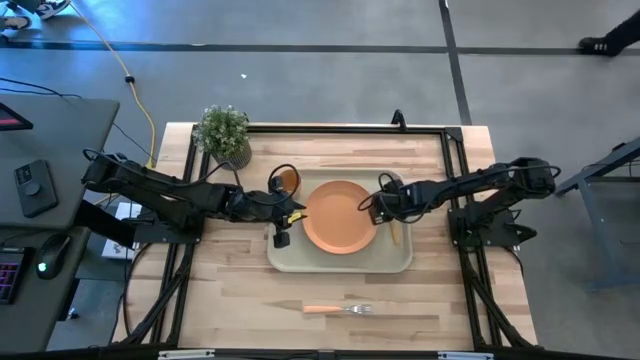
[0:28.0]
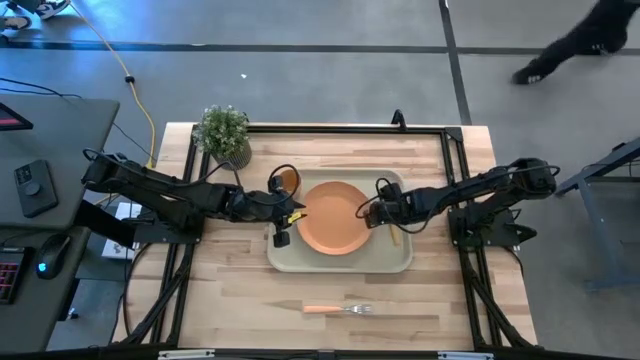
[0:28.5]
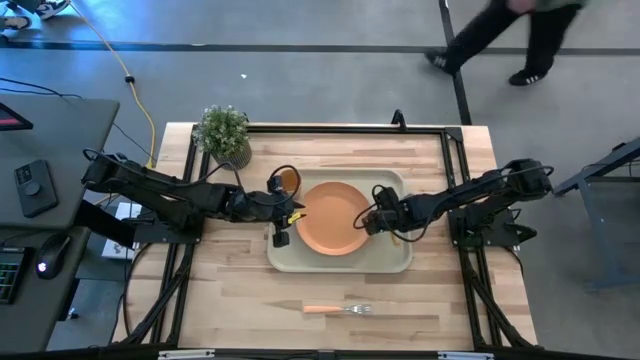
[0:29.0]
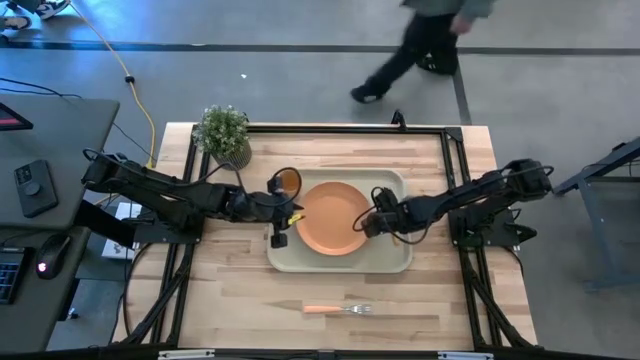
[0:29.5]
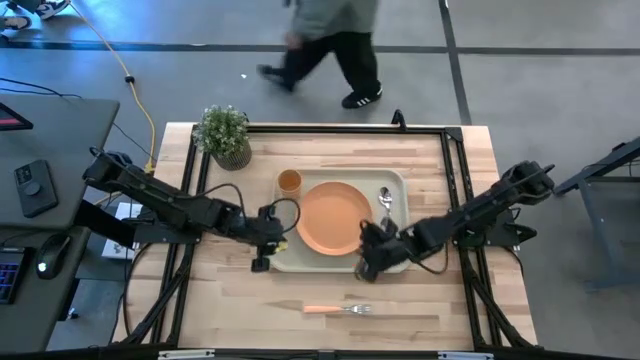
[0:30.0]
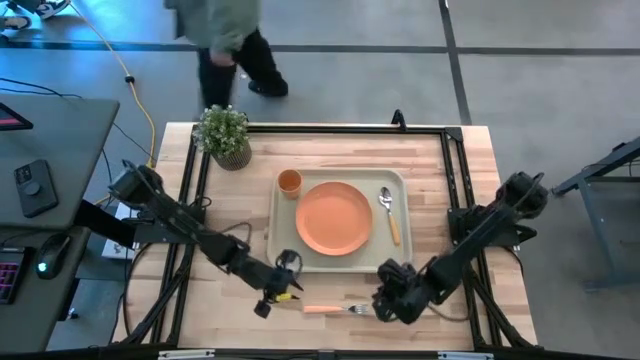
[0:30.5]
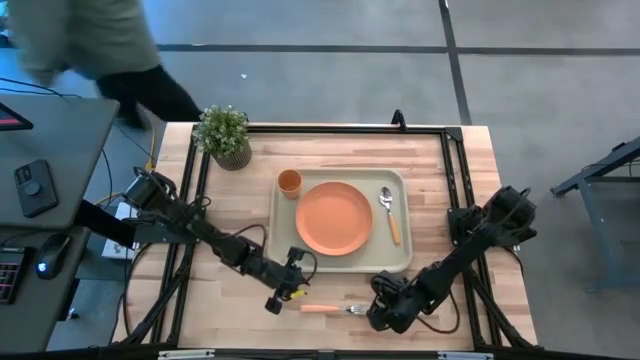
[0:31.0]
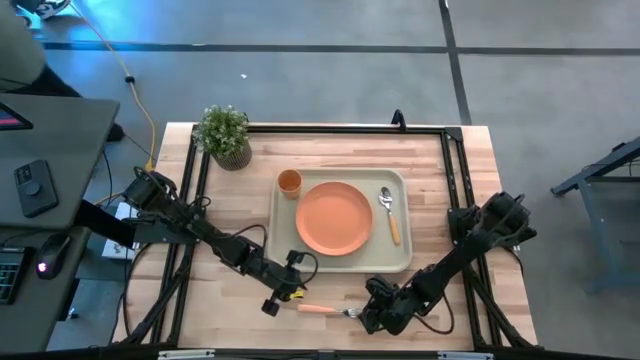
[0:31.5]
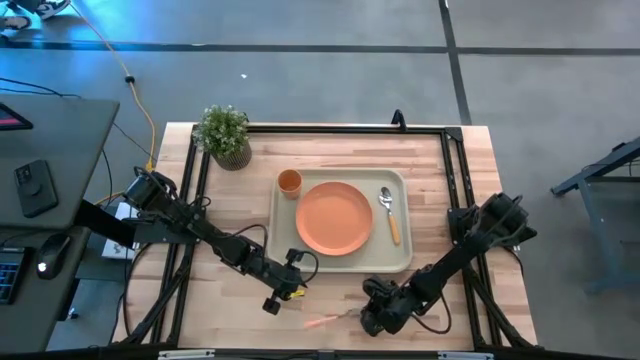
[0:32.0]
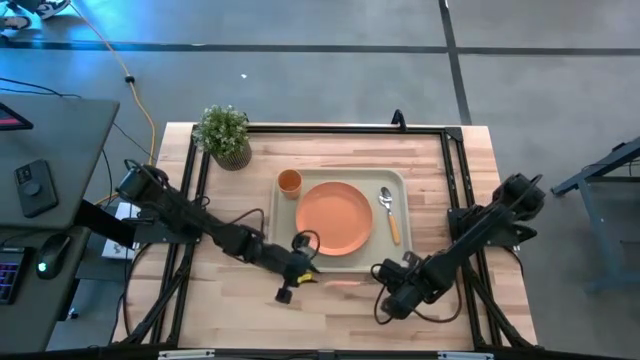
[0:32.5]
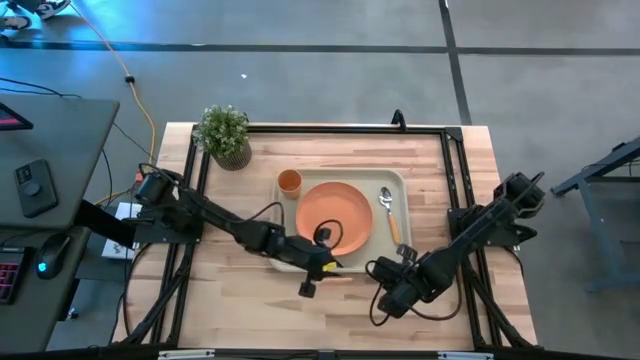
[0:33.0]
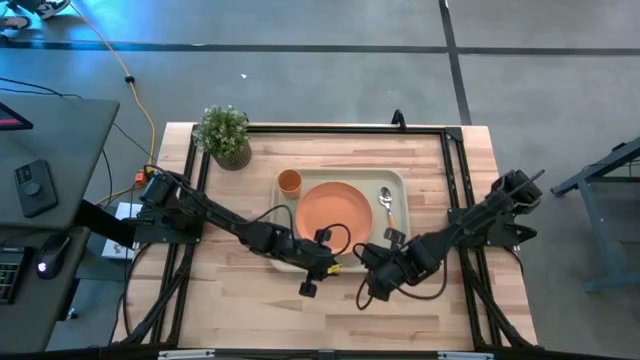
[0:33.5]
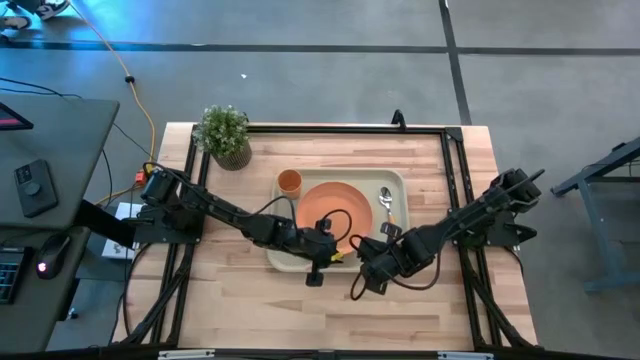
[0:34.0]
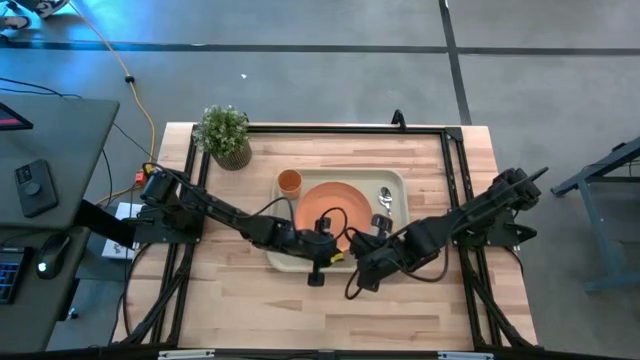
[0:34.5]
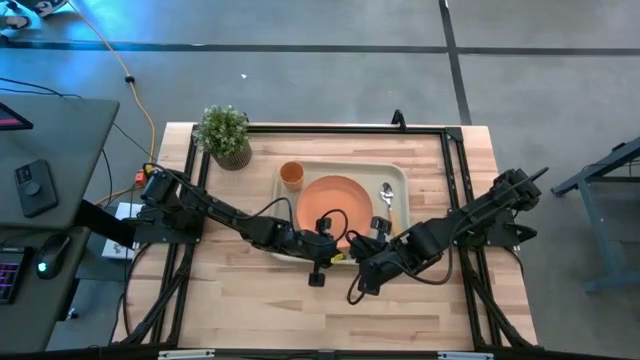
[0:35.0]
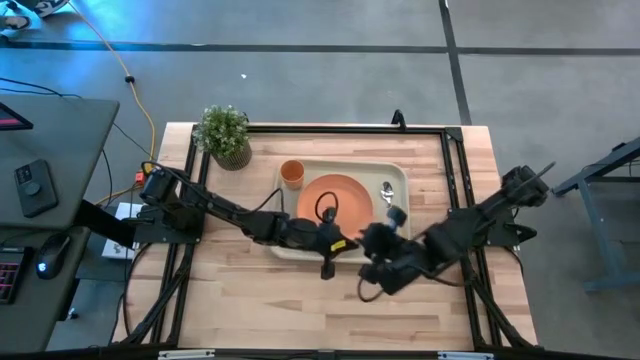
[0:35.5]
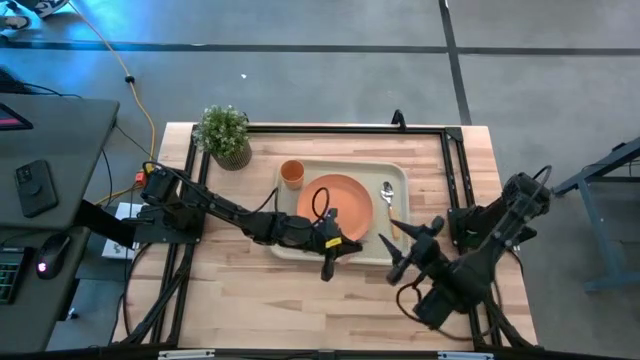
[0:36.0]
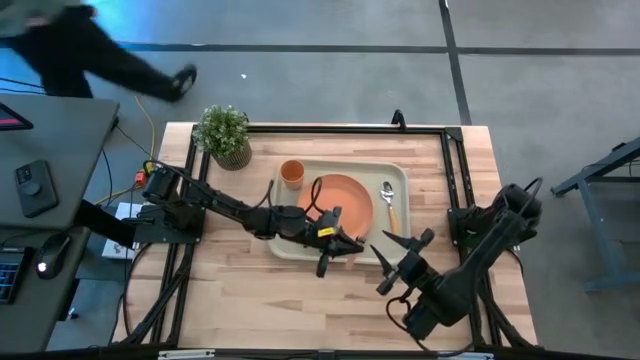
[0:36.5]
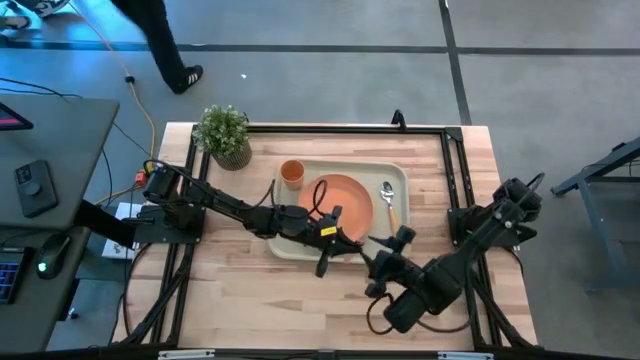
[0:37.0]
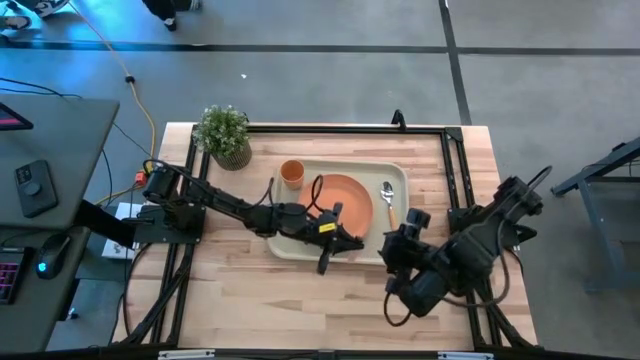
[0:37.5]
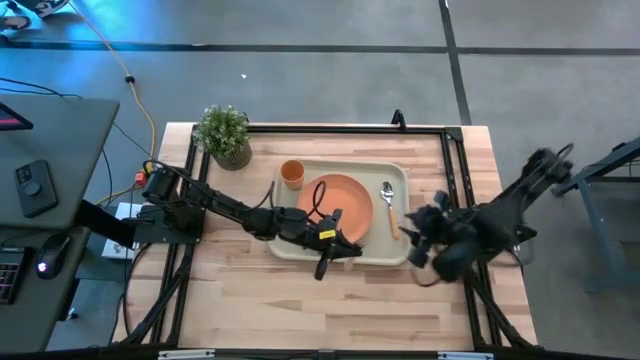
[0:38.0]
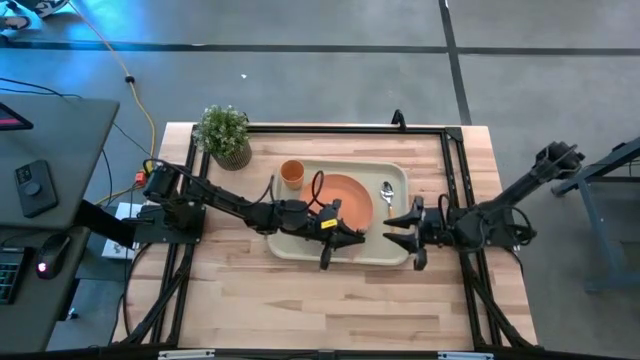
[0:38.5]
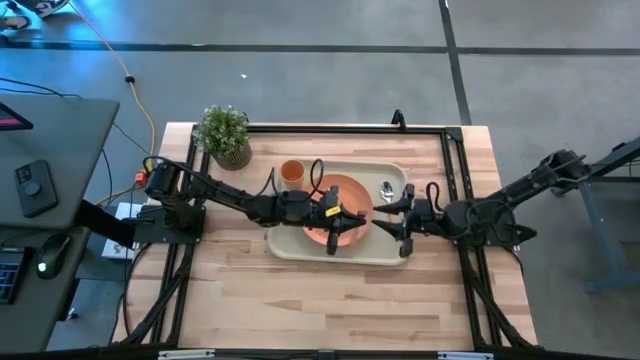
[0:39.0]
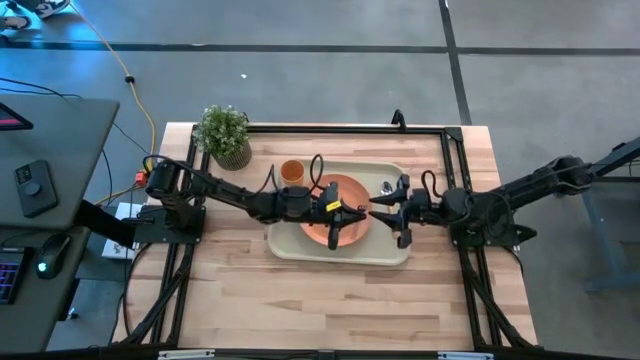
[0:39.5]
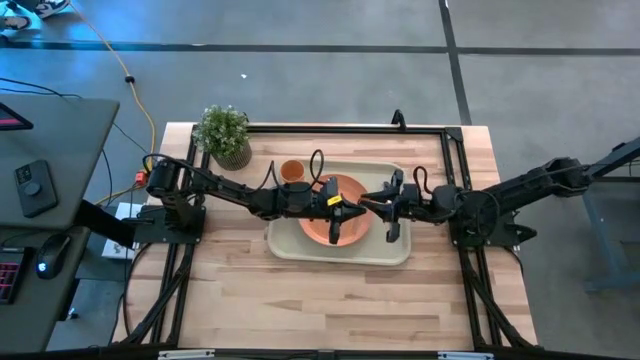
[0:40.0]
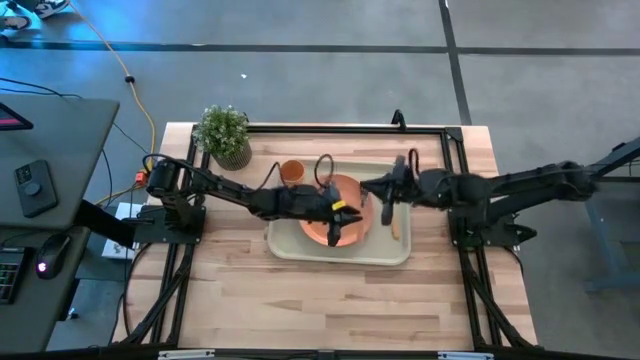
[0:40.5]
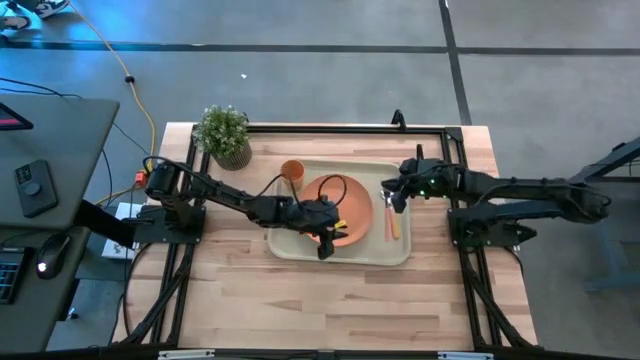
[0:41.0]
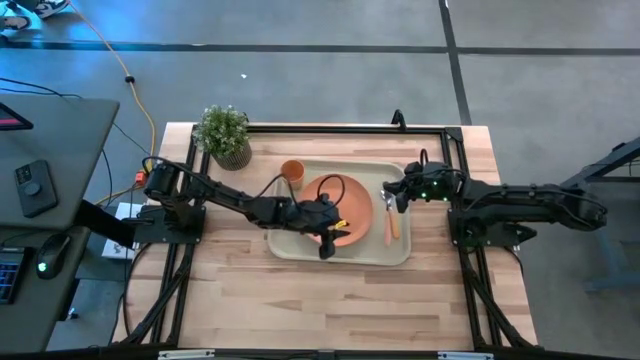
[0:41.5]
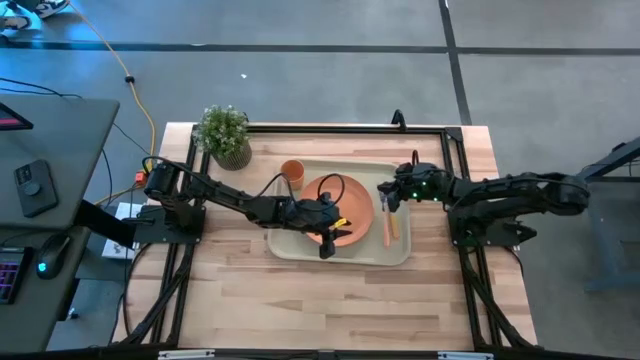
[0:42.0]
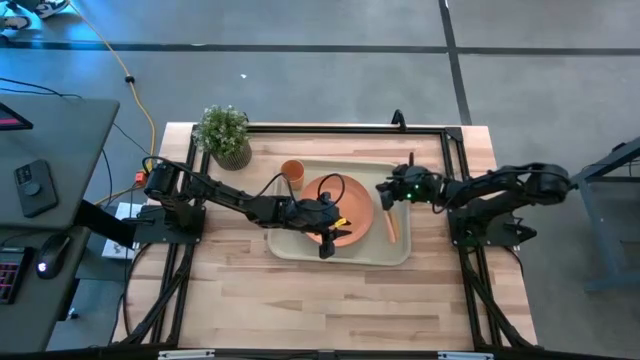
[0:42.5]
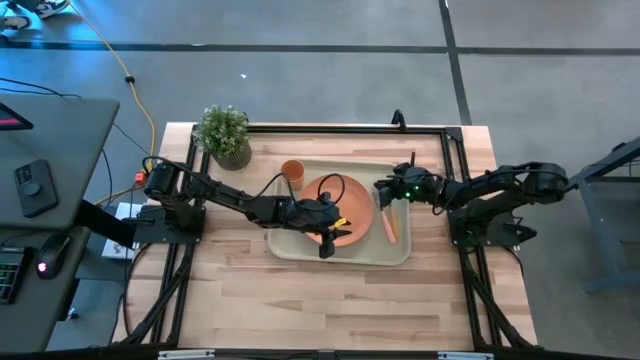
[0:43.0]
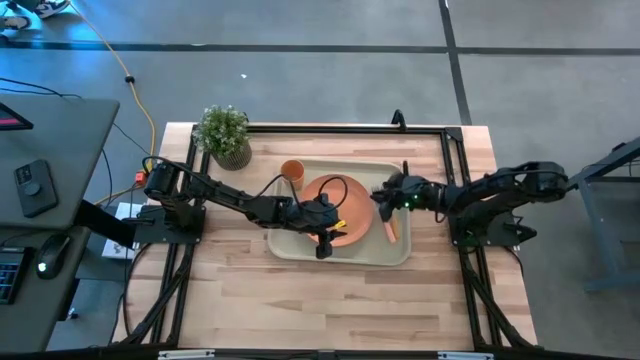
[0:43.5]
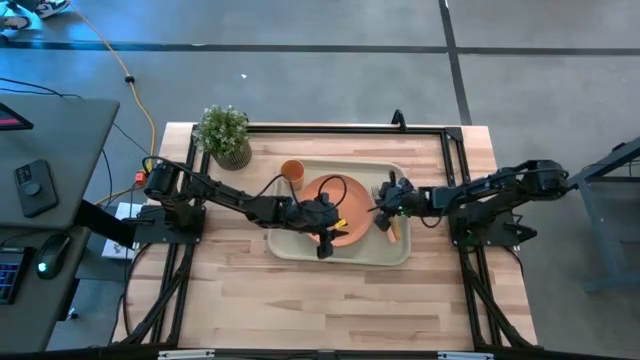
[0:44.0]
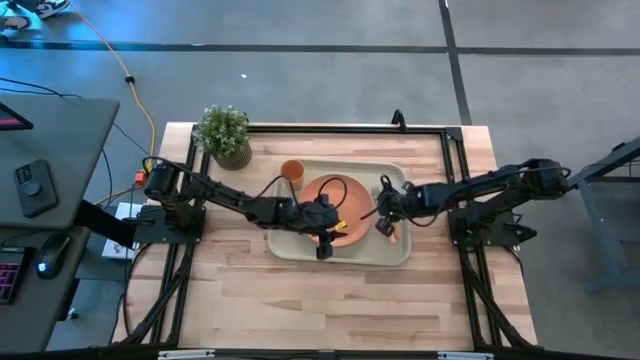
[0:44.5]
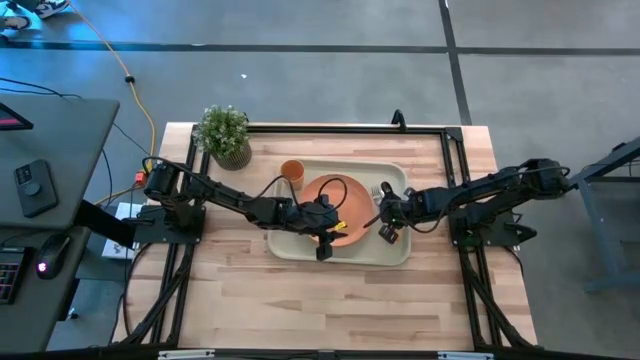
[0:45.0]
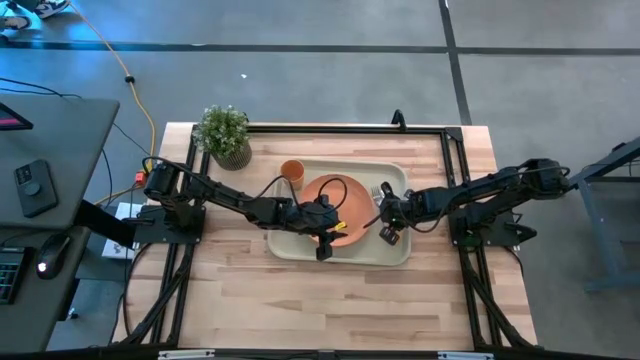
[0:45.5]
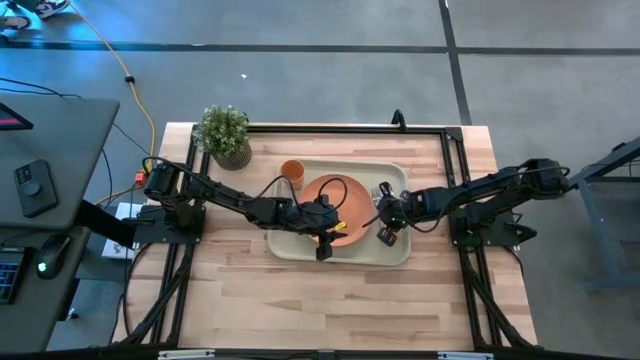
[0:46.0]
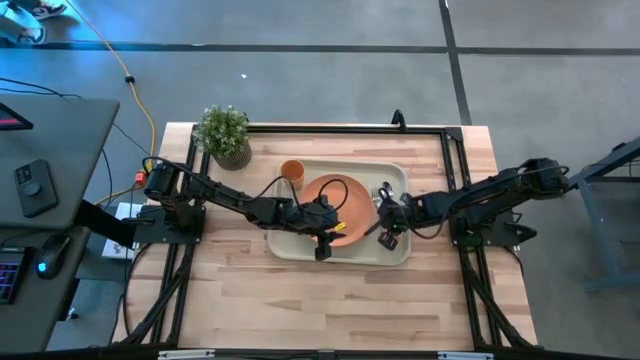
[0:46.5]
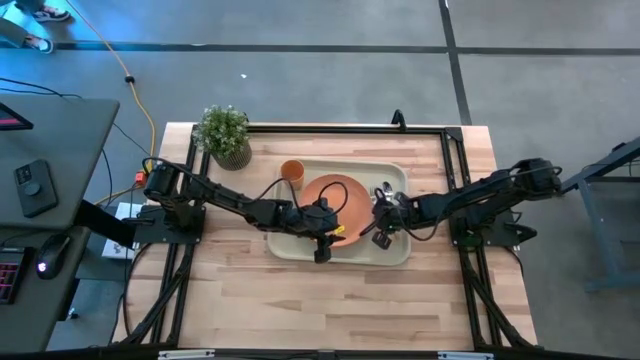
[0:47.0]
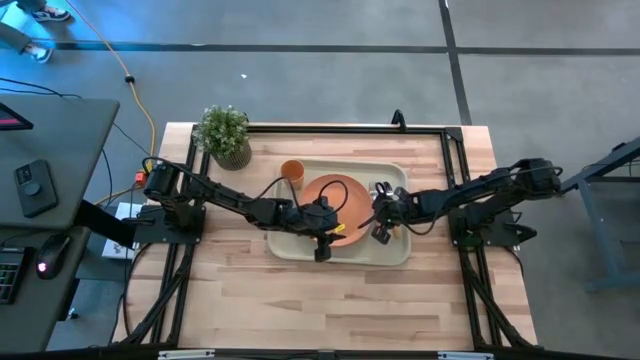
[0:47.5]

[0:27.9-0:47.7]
Task: Pick and place plate/cup/fork/spoon on tray
Put the light orange fork on the light brown tray to the right of the orange plate
